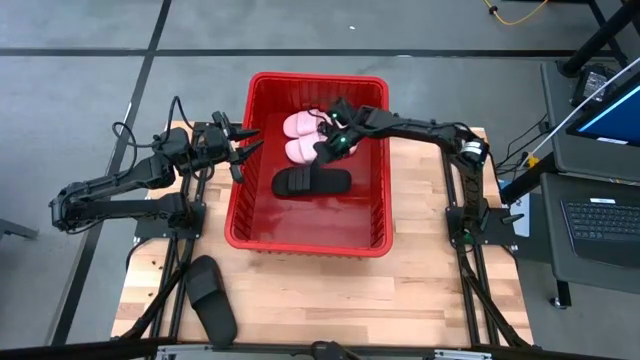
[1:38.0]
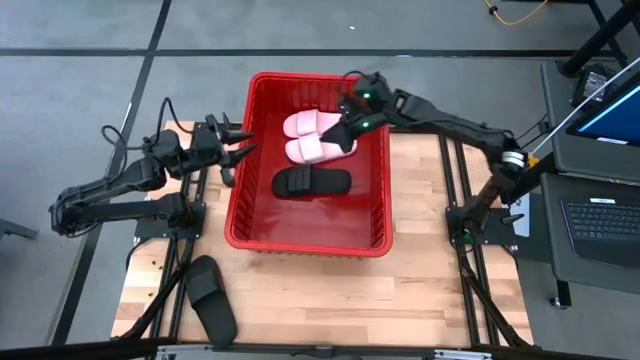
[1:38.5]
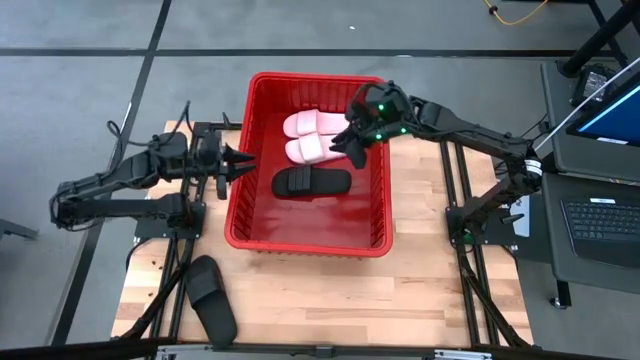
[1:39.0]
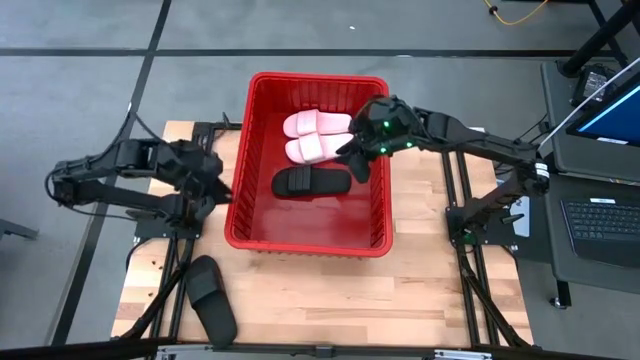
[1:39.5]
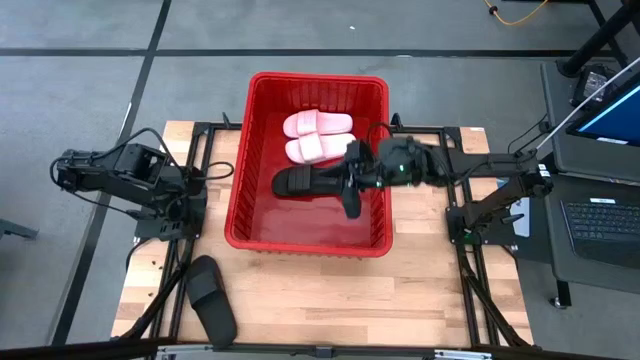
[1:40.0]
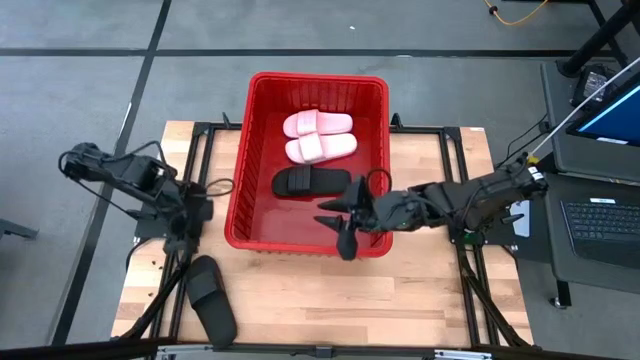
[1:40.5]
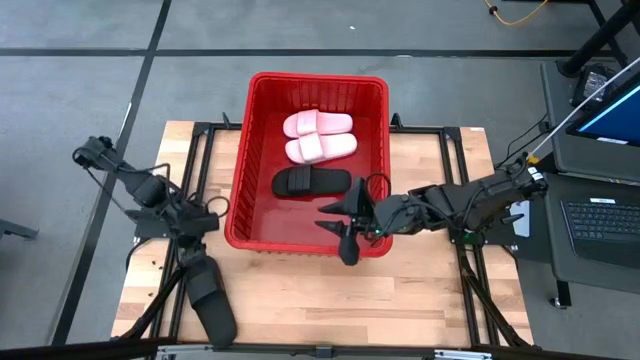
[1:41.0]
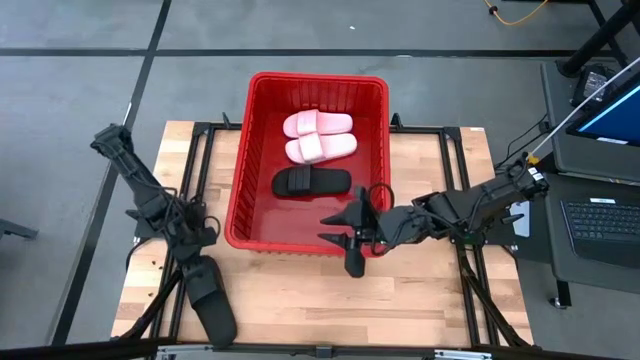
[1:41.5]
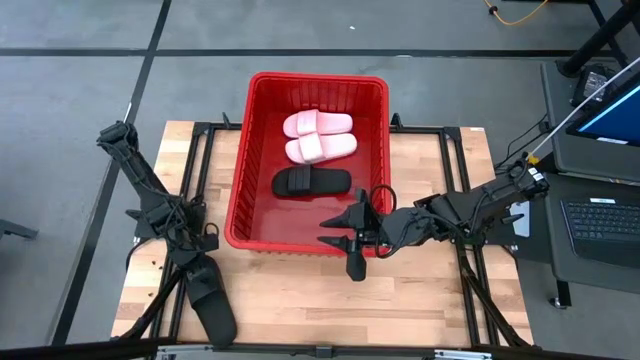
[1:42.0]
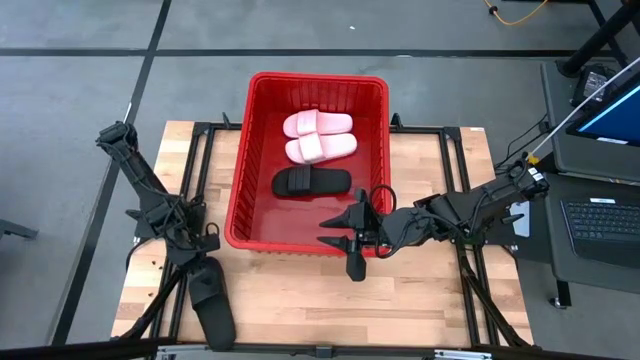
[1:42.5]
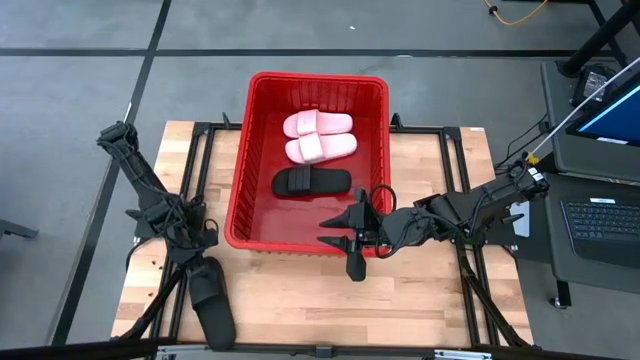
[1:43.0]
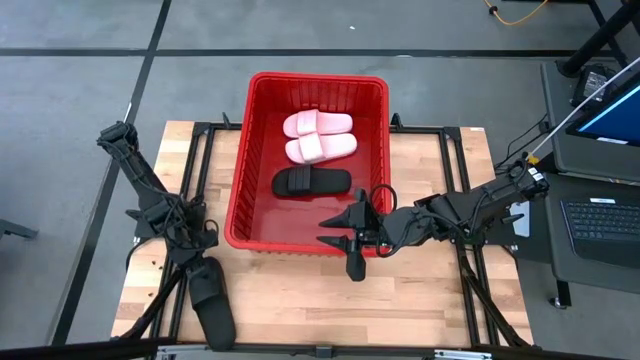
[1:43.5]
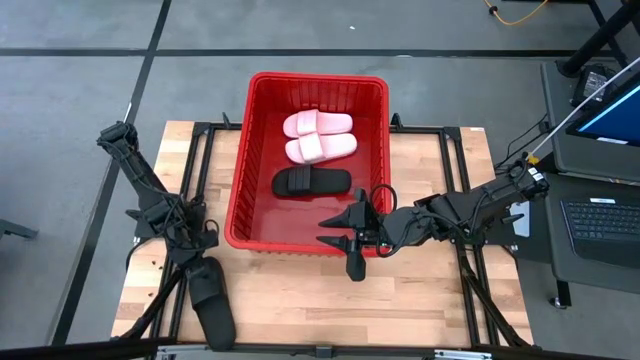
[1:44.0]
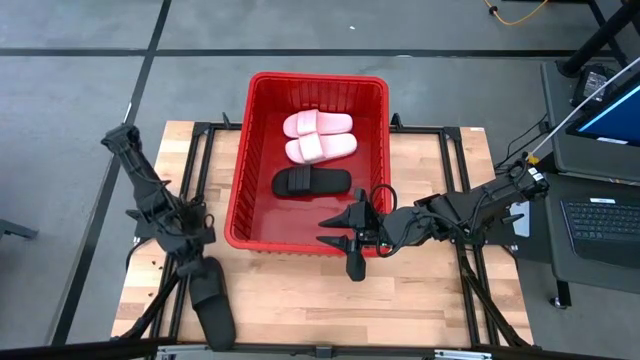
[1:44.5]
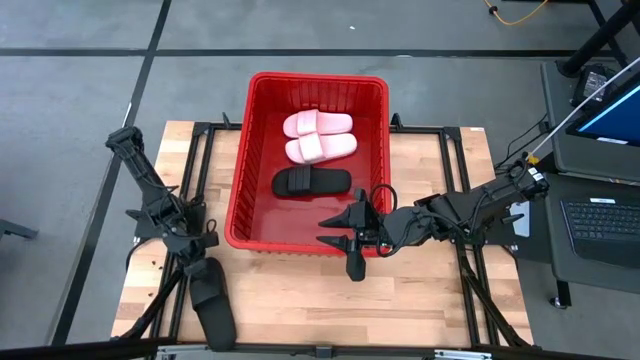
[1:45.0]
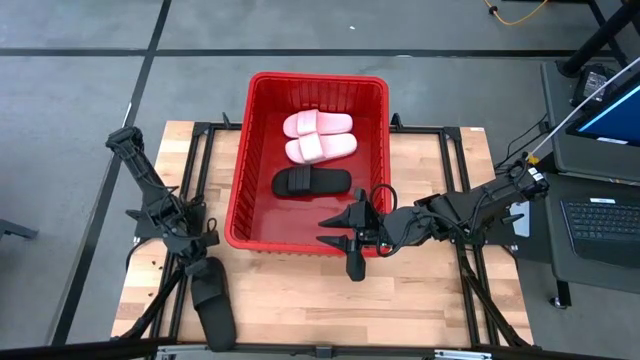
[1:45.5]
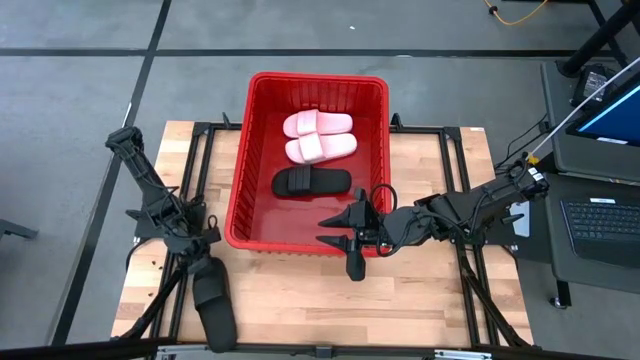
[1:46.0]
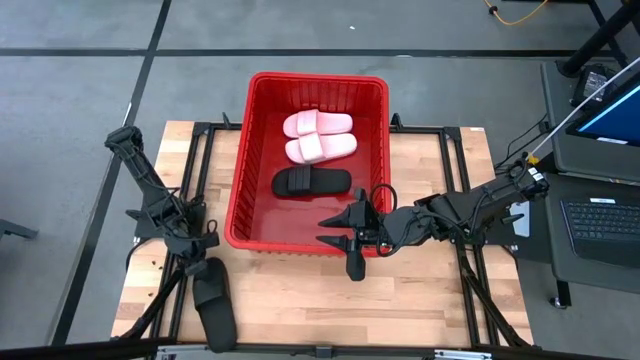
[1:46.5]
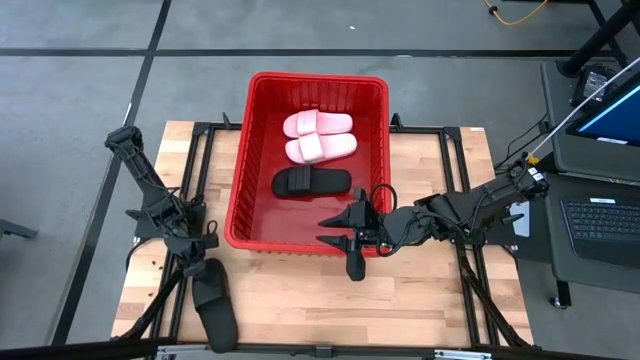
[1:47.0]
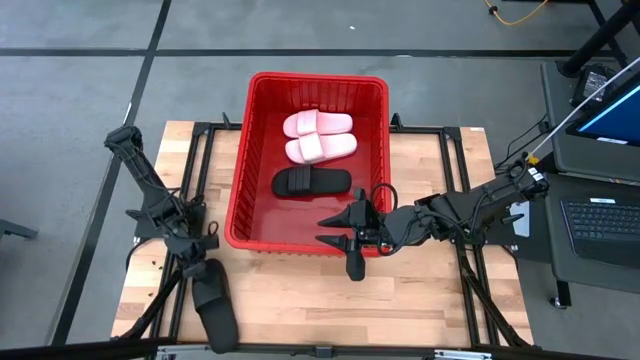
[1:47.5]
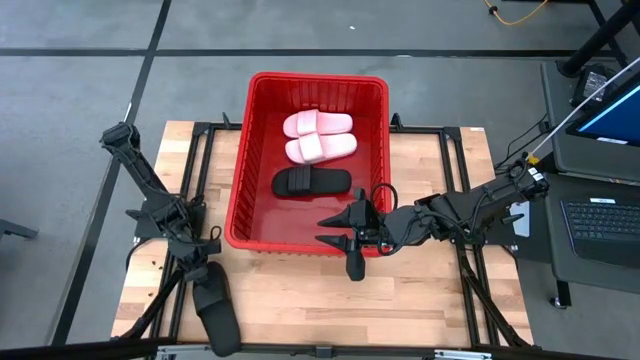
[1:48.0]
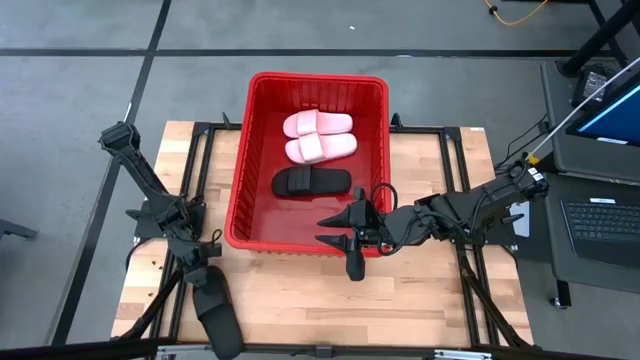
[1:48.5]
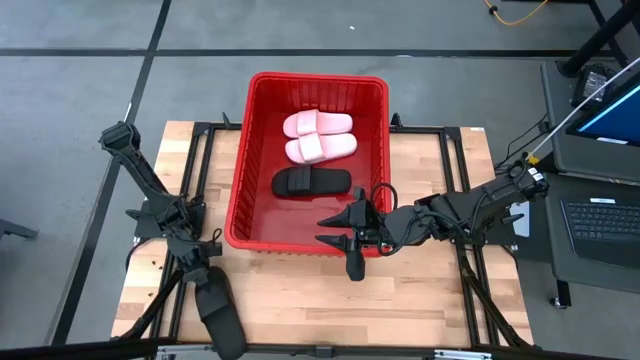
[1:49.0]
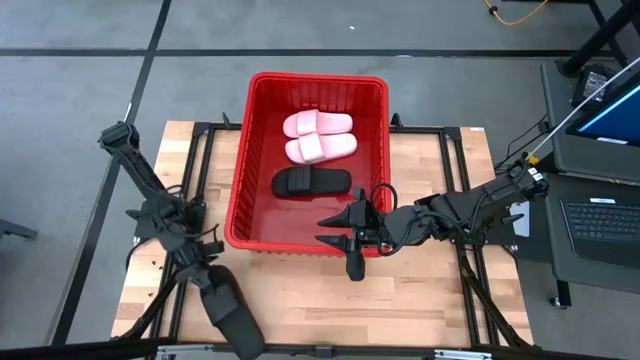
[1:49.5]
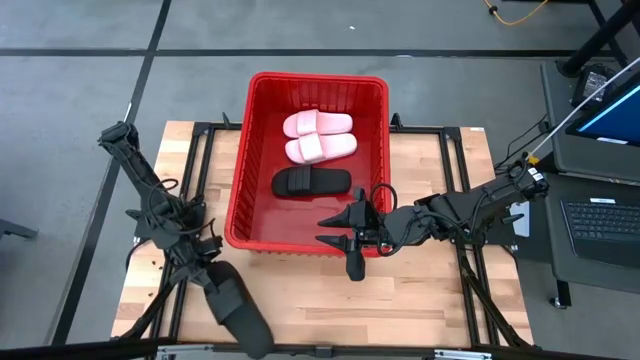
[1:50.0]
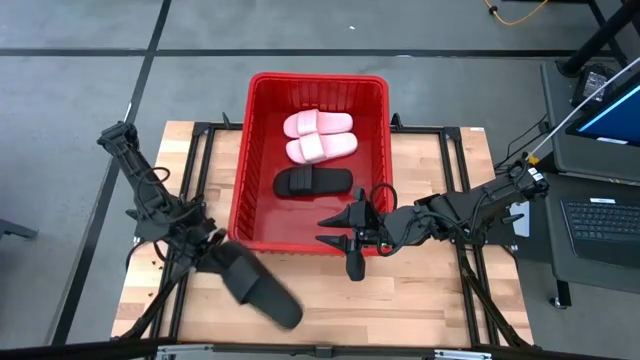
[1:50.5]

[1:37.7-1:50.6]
Task: Pick and place slides into bin
Put the black slide into the bin

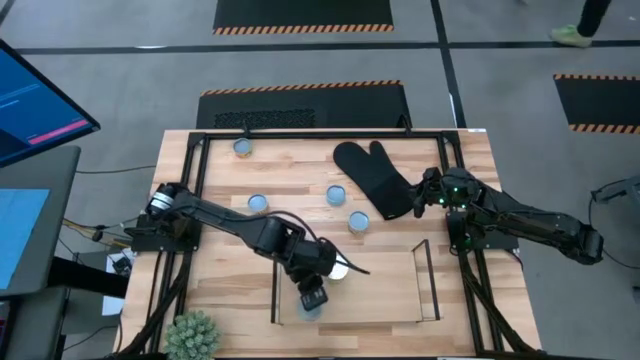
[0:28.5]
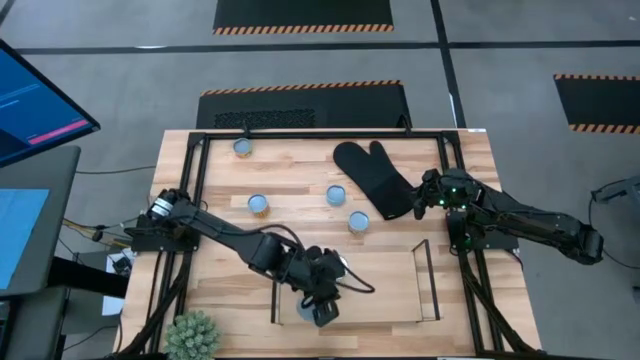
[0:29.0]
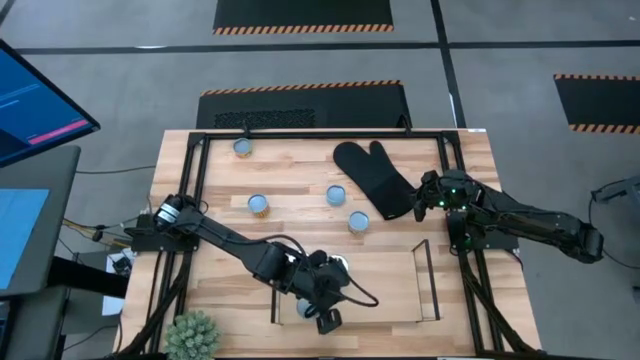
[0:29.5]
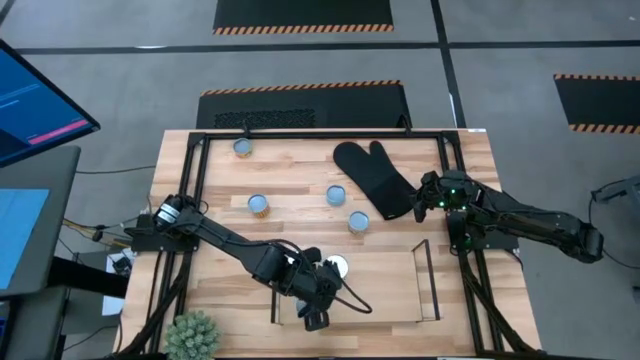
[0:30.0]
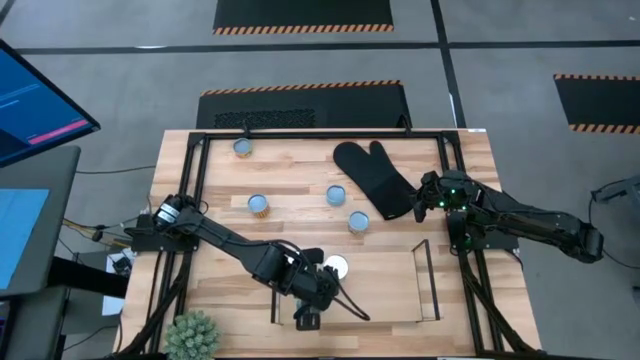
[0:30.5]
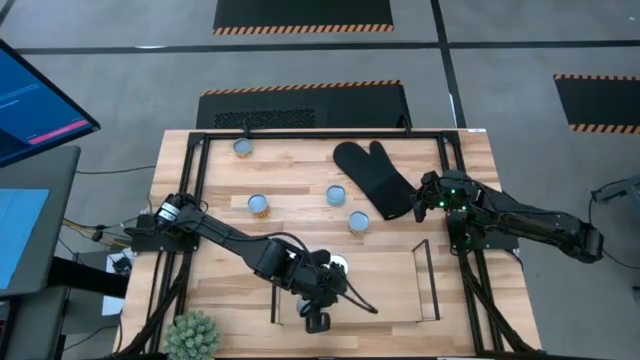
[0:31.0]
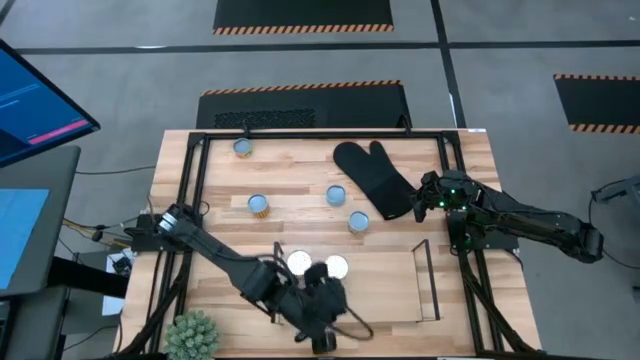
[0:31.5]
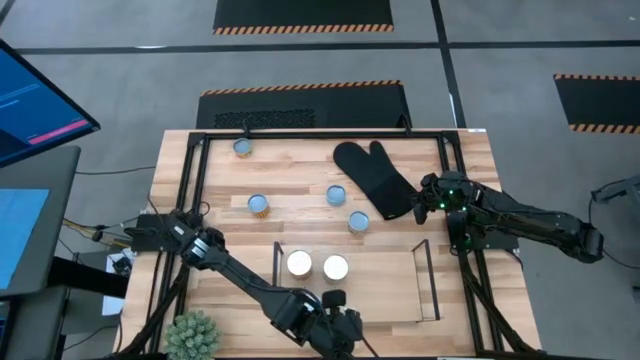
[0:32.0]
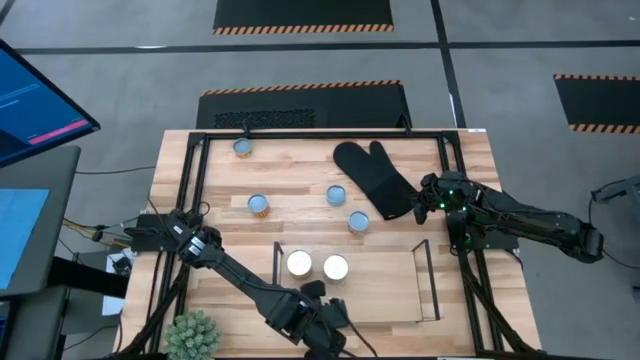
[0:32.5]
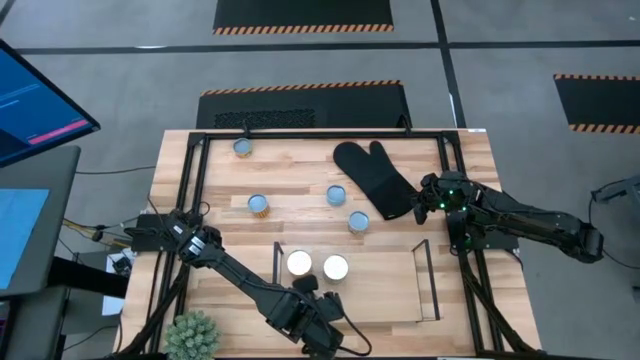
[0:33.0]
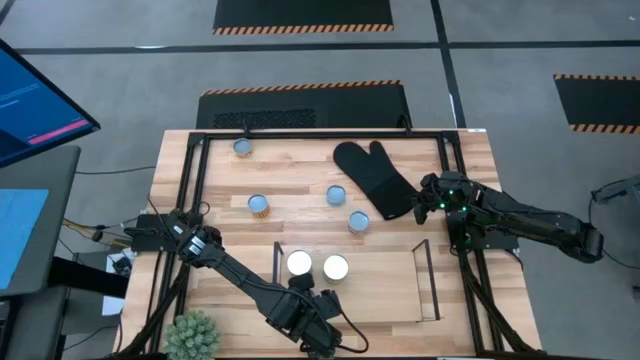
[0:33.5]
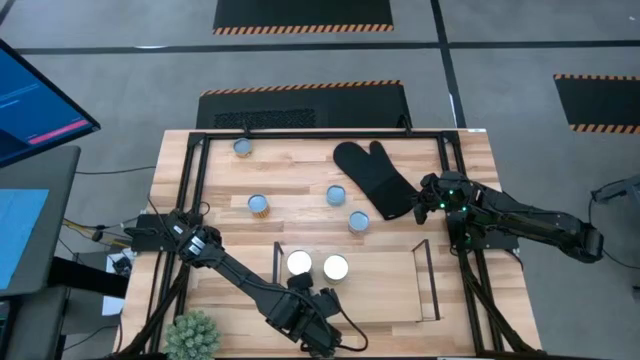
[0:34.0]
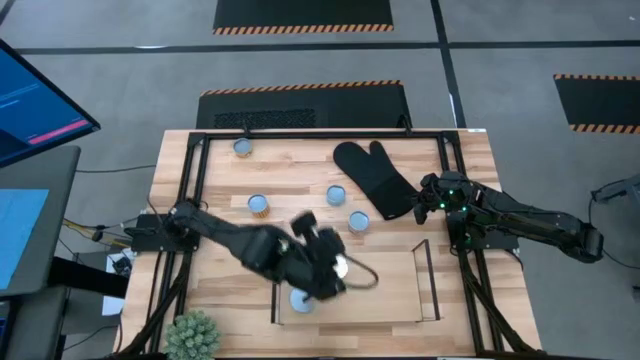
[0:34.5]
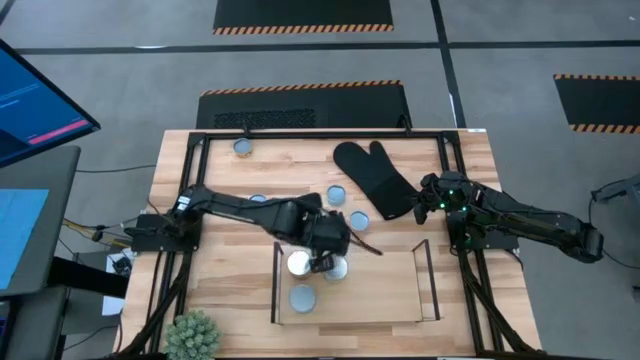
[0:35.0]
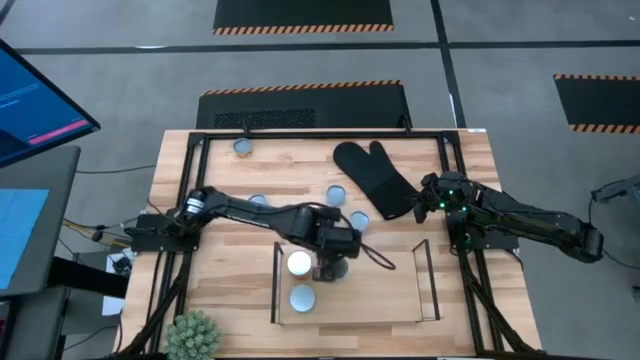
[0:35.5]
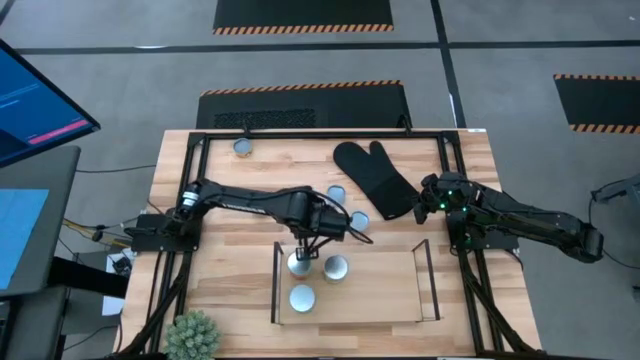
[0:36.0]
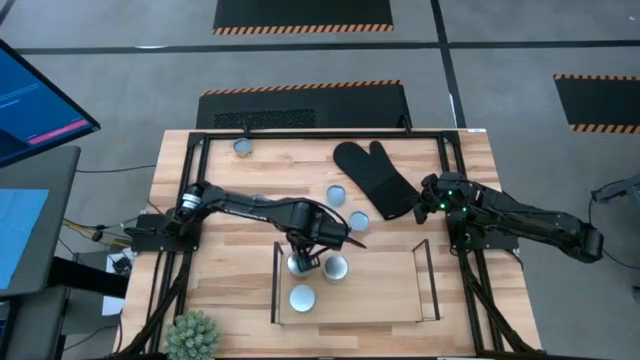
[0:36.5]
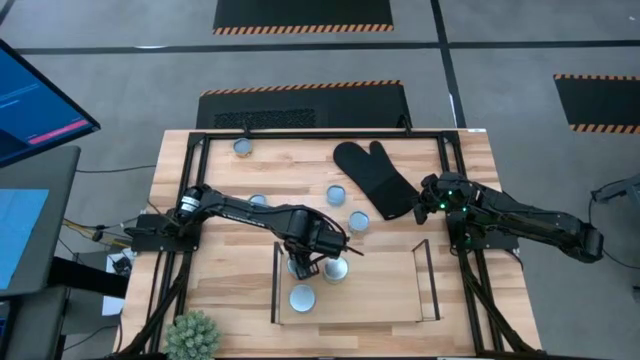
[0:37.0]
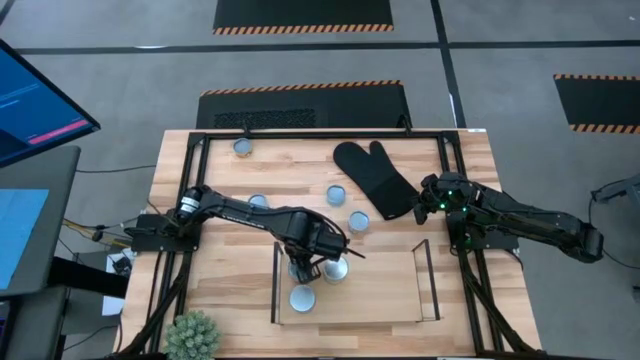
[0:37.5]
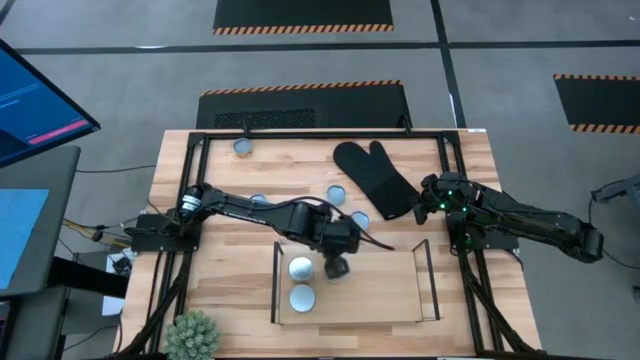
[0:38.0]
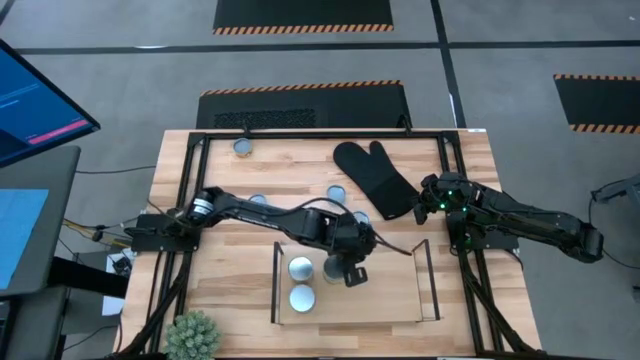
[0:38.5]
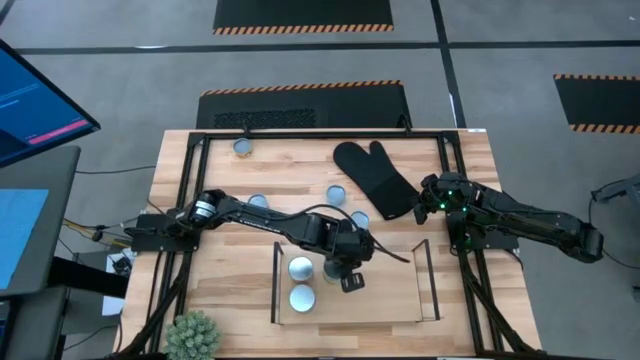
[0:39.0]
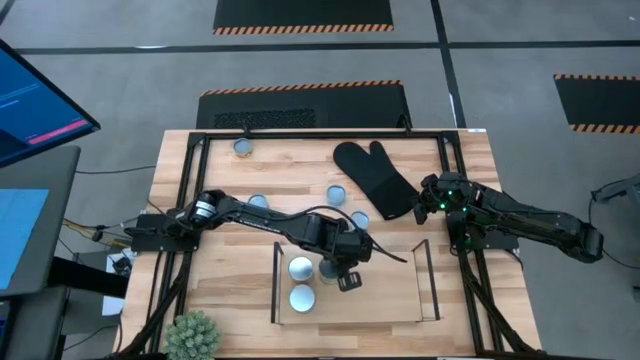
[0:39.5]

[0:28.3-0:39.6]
Task: Pick and place cans onto a shelf
Adjust the cans on the shelf
